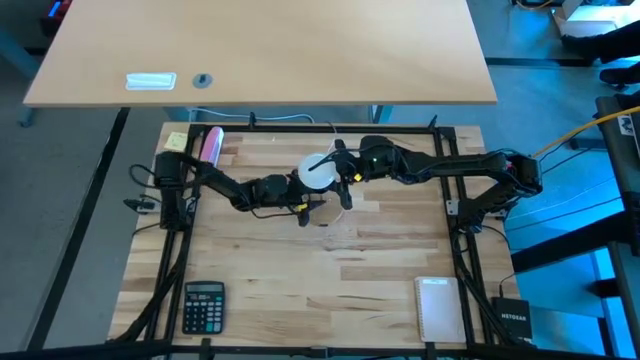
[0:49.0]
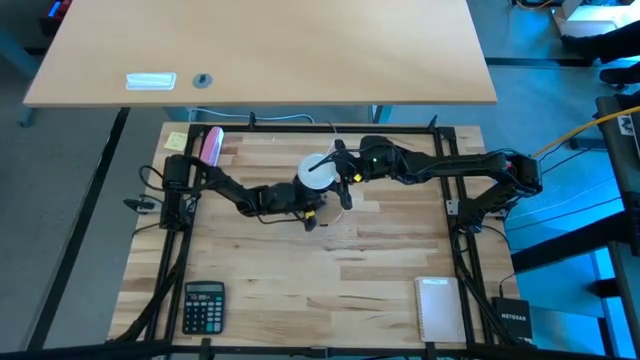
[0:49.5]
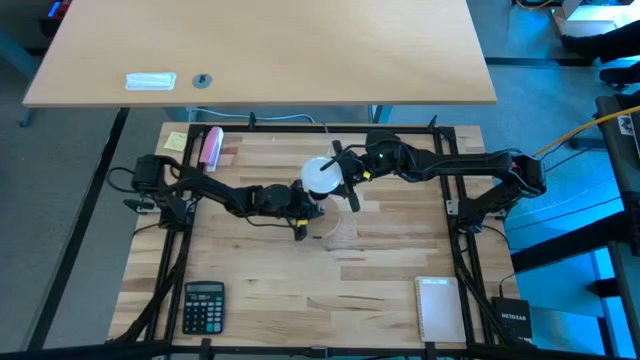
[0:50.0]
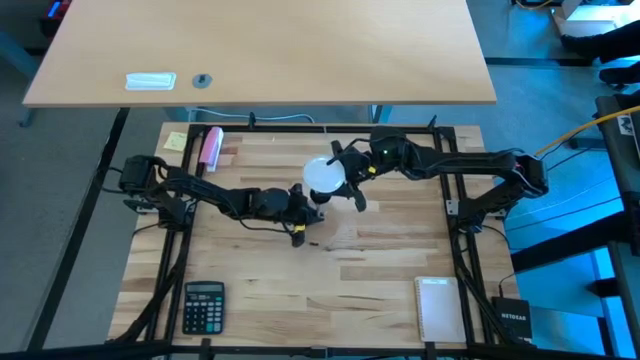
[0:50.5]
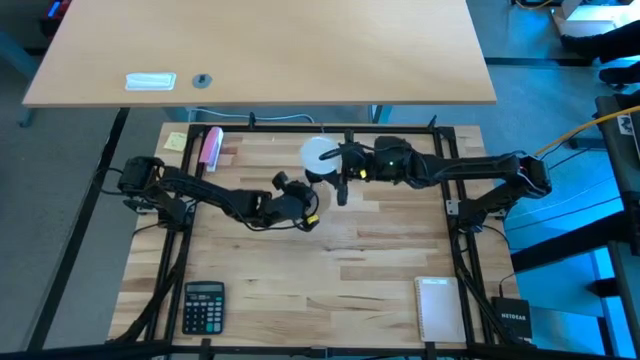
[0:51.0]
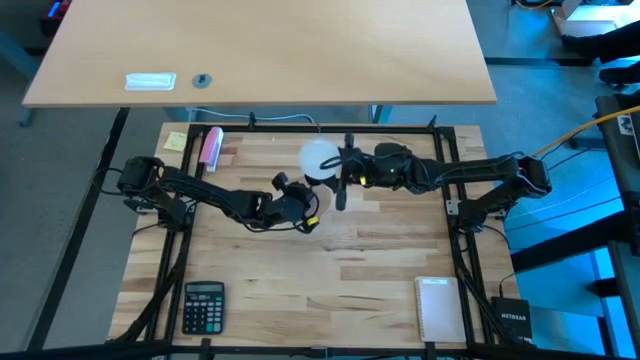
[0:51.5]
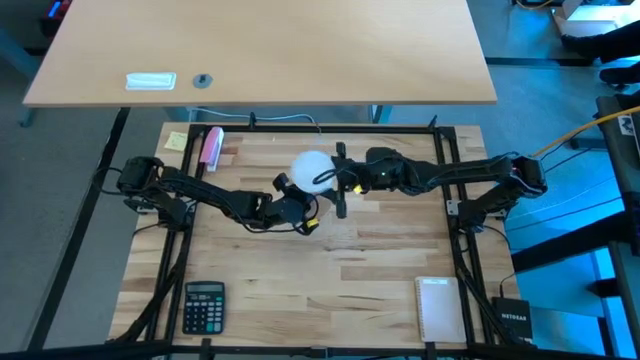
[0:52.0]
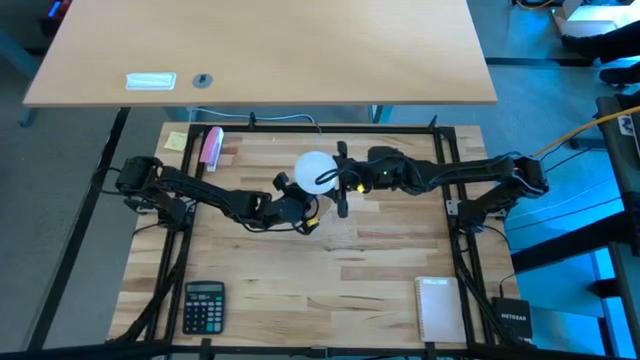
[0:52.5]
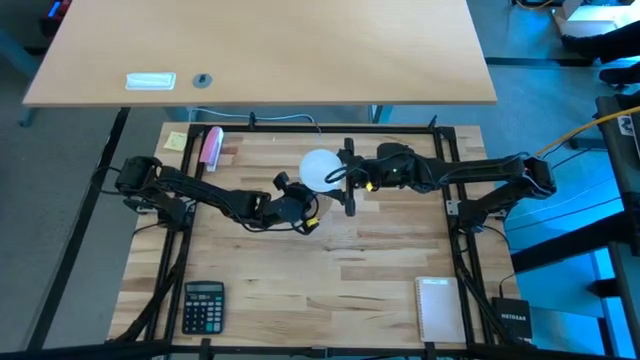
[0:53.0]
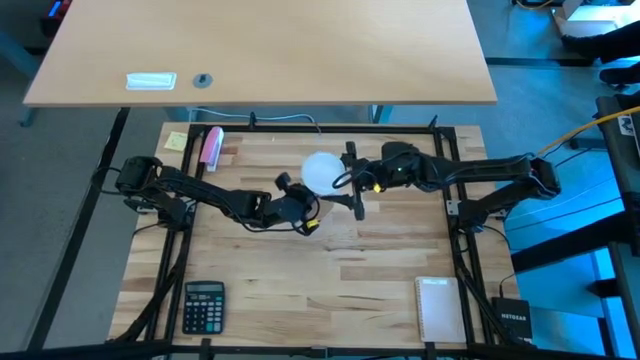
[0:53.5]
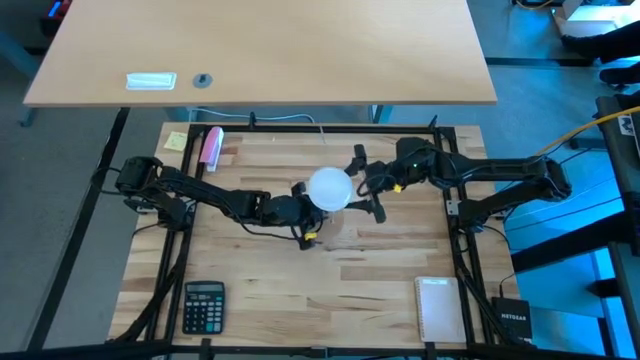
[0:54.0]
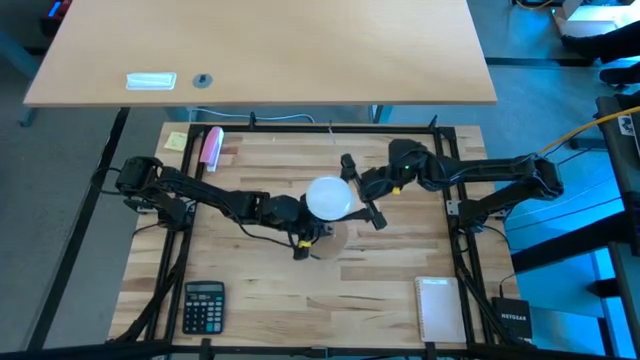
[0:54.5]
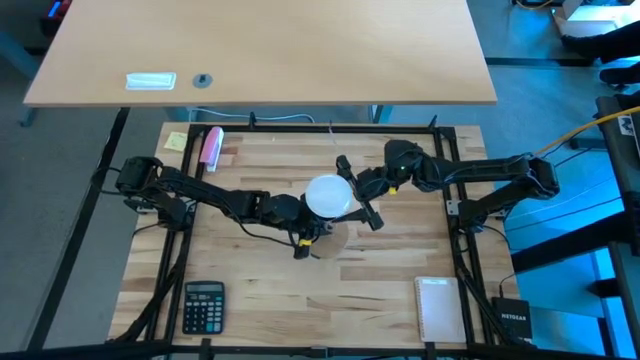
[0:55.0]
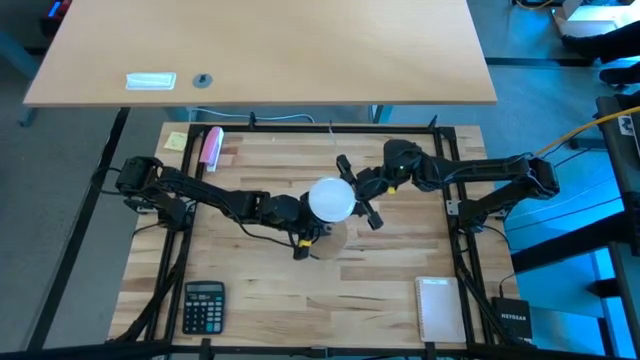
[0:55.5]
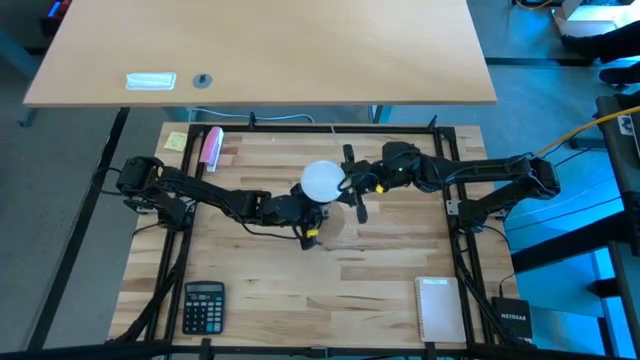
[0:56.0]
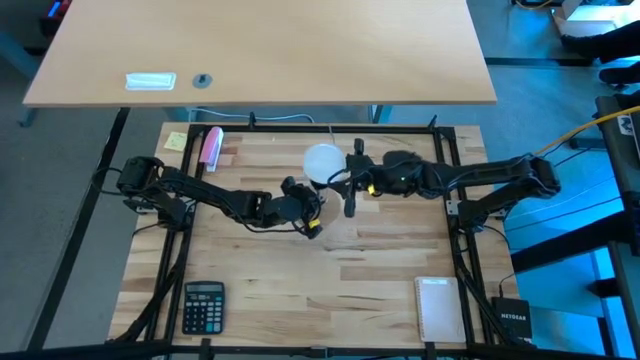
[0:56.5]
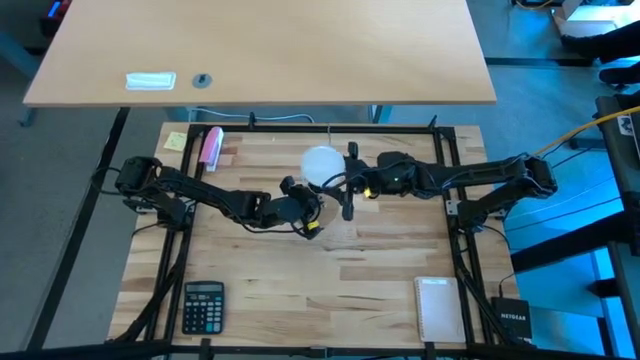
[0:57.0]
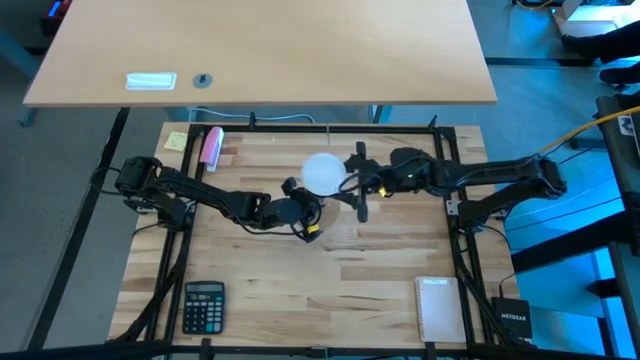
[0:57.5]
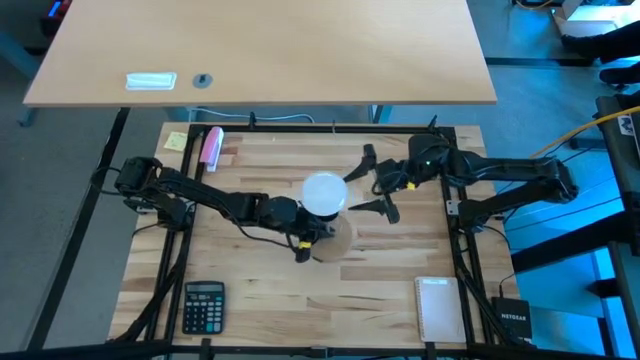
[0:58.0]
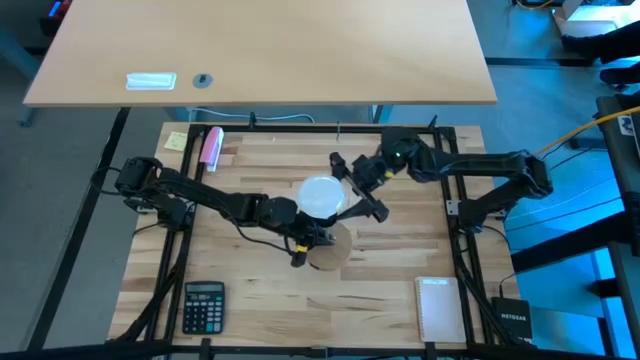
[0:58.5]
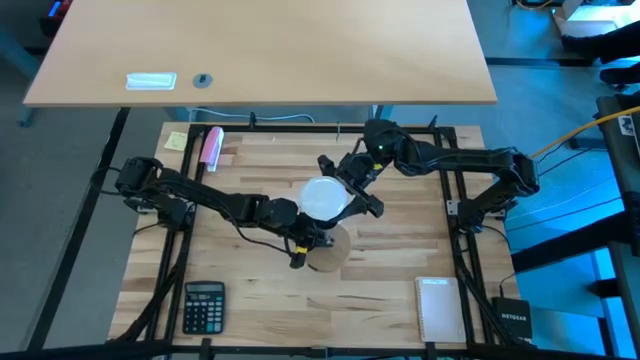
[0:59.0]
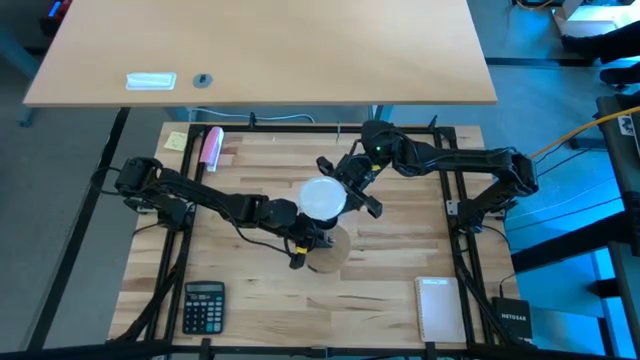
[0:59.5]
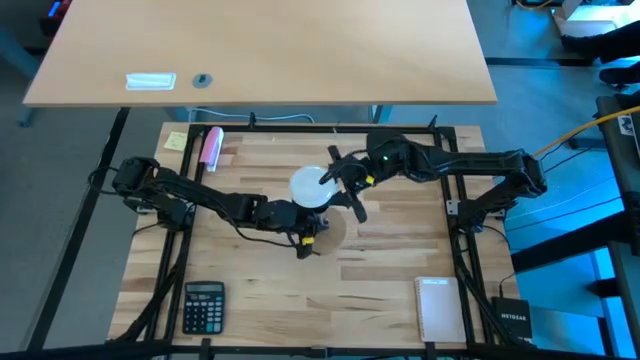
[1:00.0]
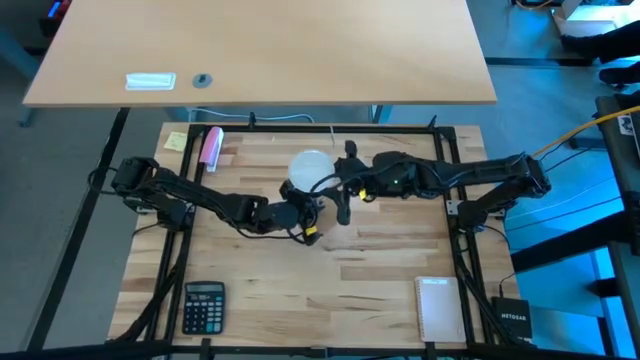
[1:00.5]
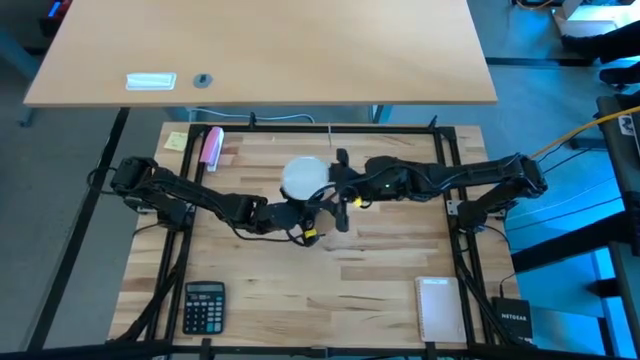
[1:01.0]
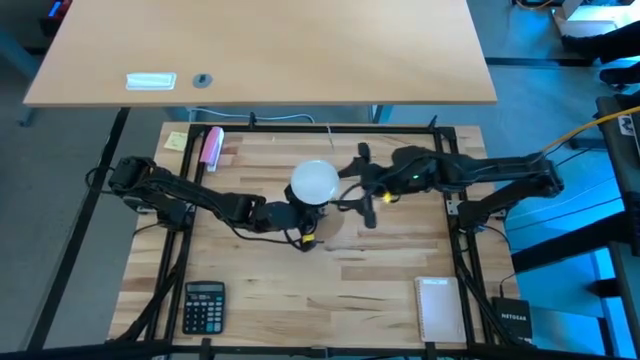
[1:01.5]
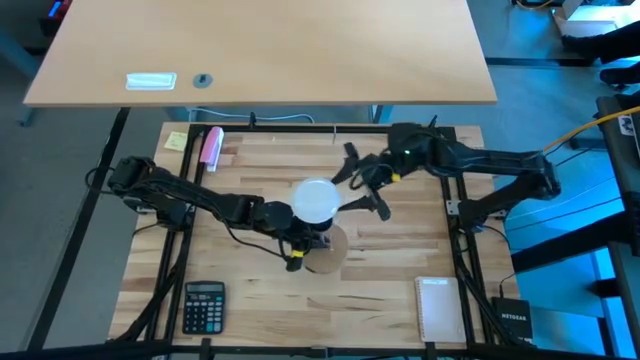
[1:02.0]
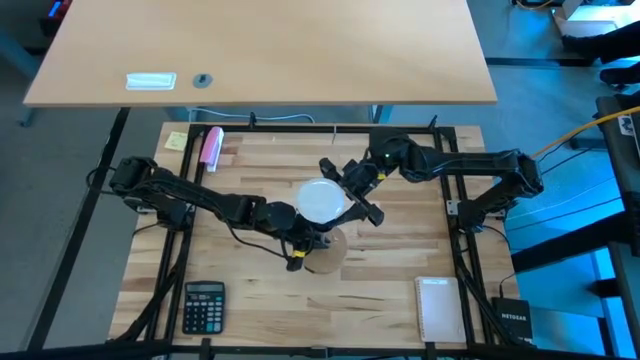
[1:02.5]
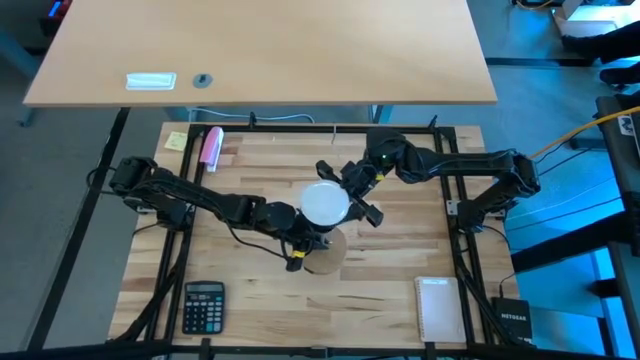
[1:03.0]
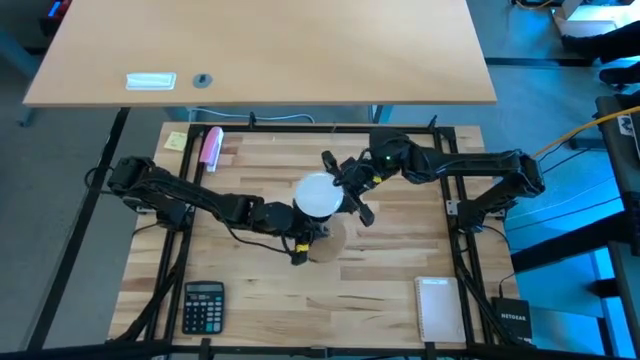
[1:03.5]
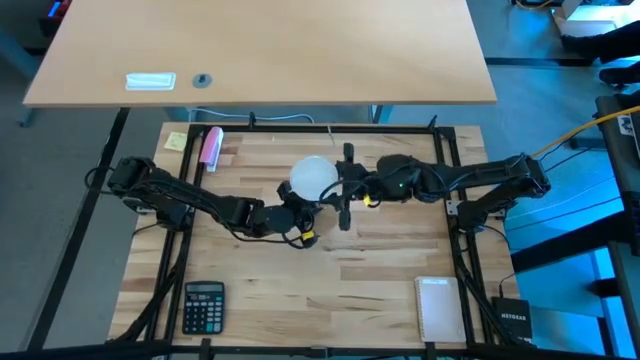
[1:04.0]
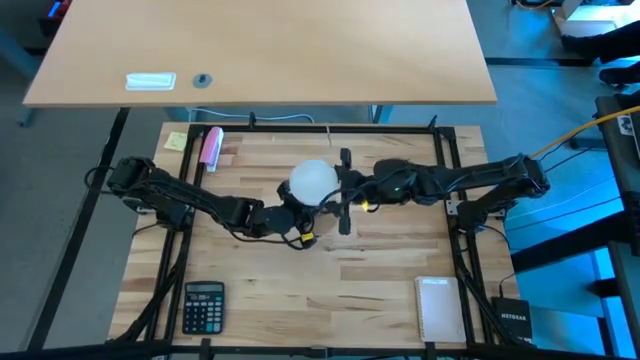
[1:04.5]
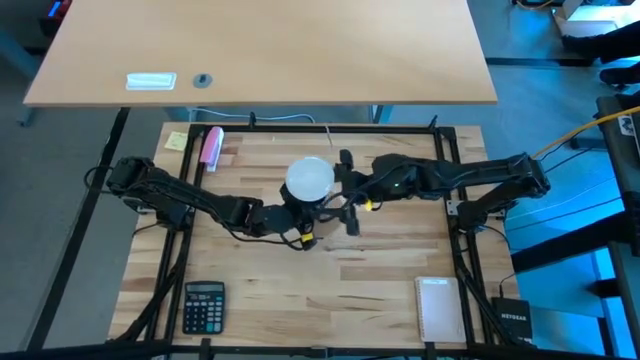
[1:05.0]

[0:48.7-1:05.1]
Task: Screw lightbulb
Insert the white lightbulb into the lamp

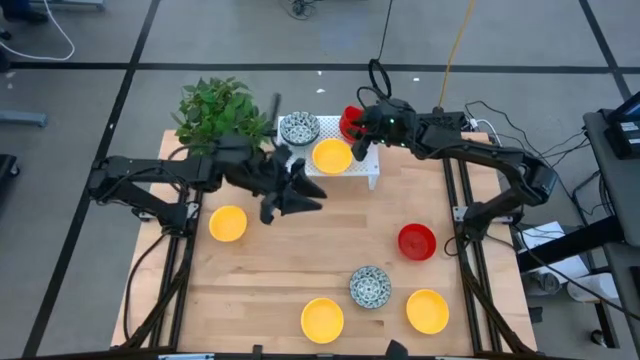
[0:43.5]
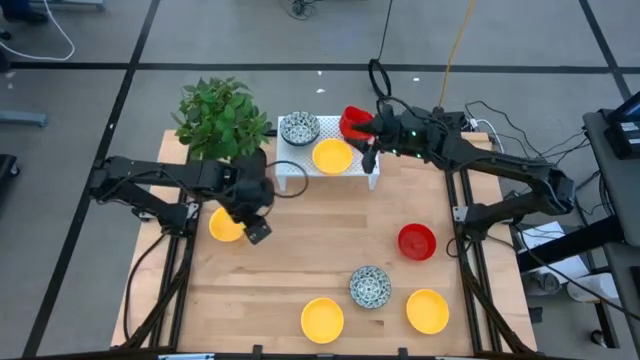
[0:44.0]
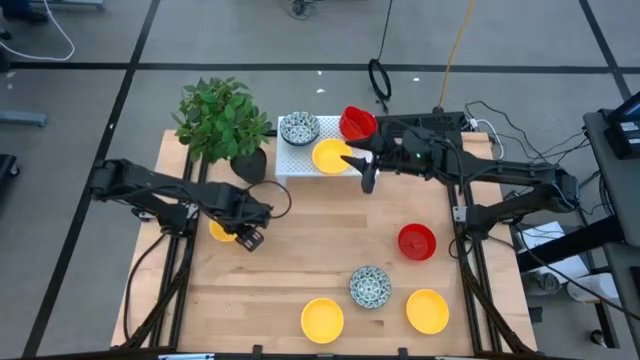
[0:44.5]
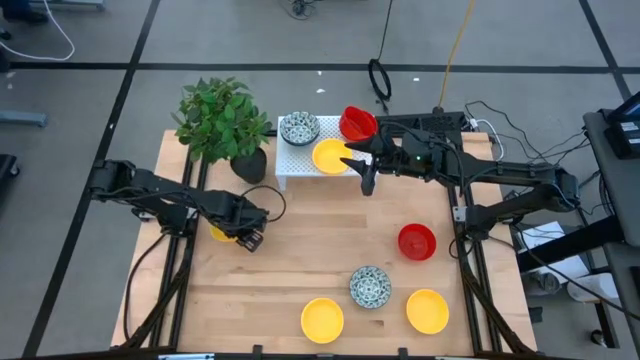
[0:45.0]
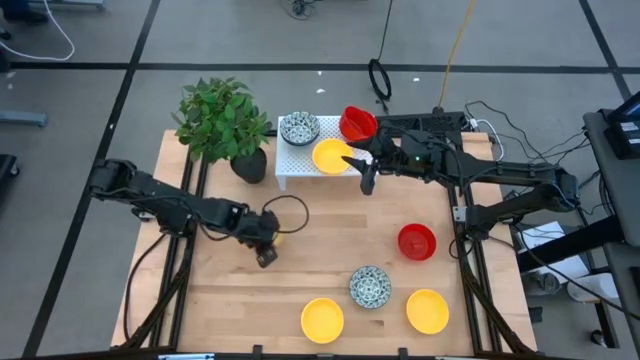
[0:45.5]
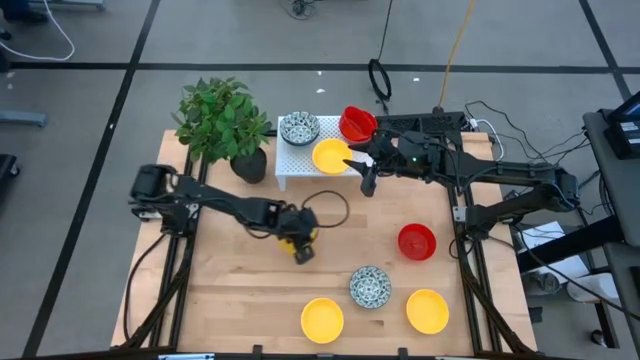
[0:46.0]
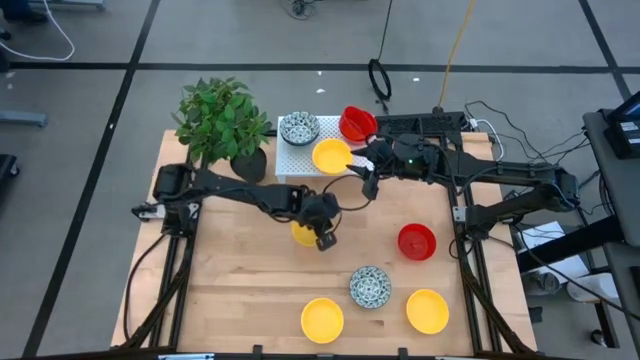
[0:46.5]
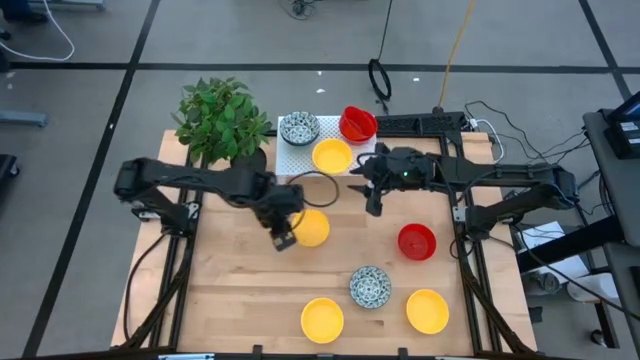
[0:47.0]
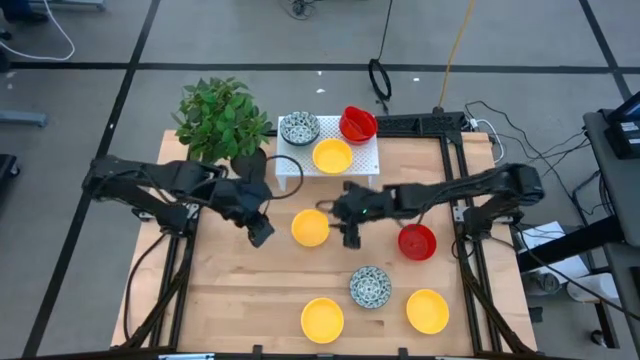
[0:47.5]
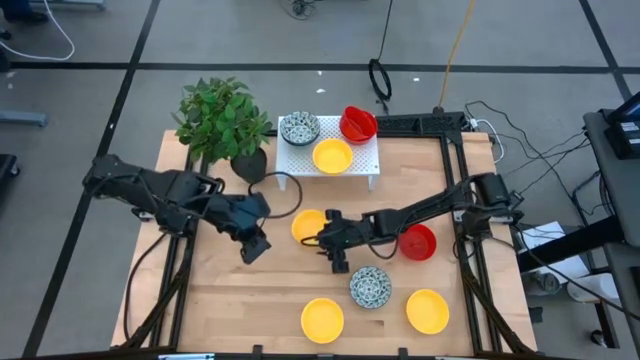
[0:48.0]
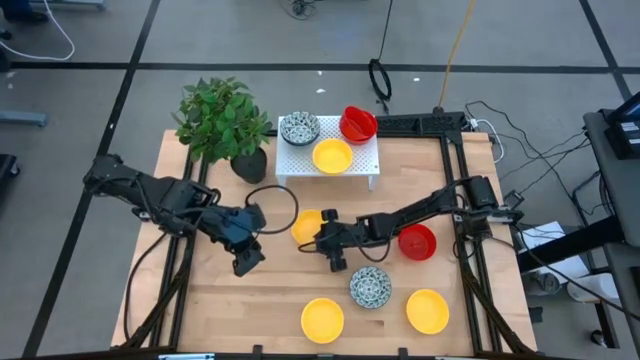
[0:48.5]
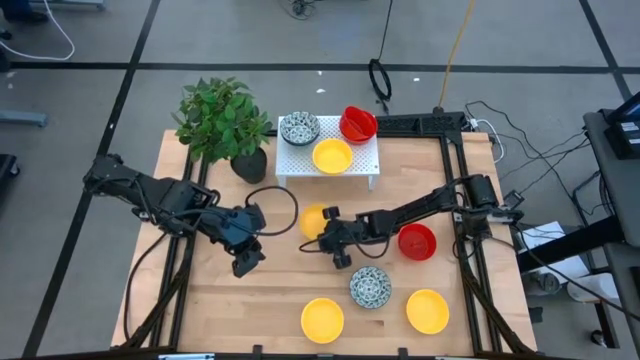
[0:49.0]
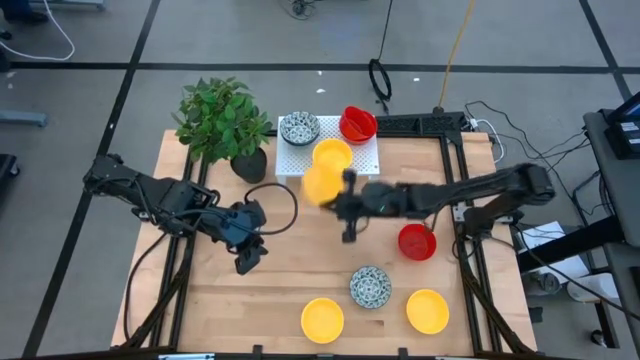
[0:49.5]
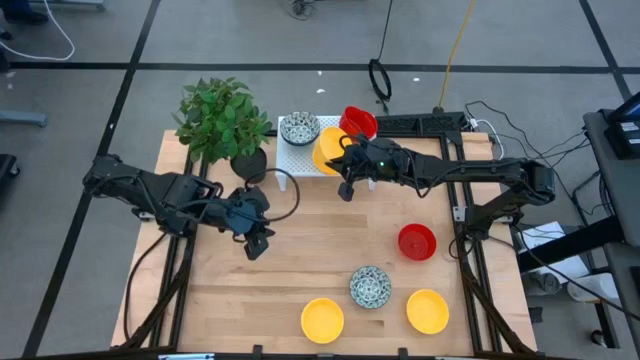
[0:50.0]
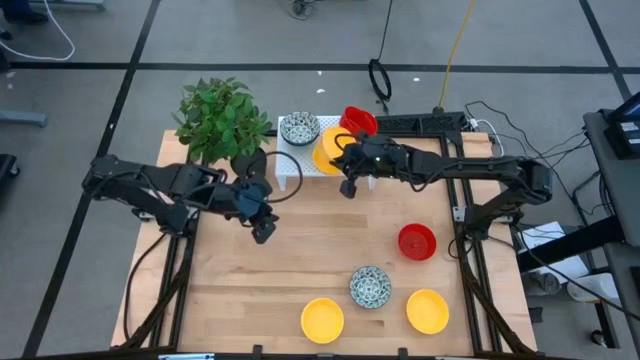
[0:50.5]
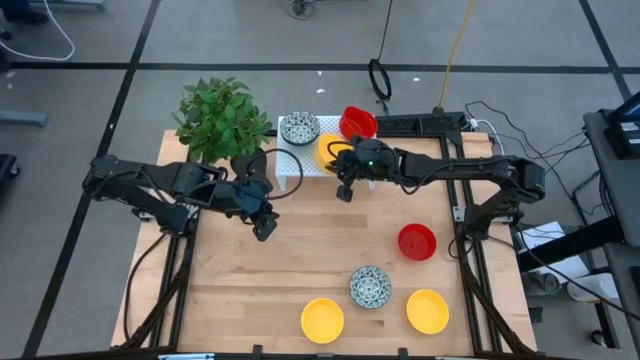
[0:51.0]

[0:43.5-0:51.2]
Task: Pick & Place Mini bowls
Stack the yellow bowl on top of the yellow bowl on the shelf
